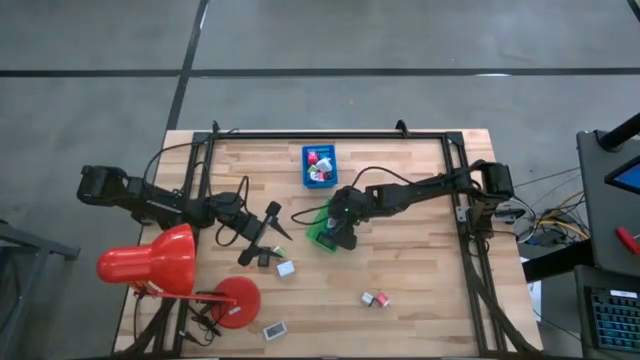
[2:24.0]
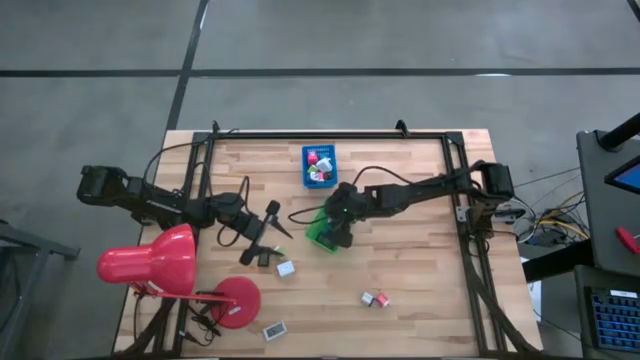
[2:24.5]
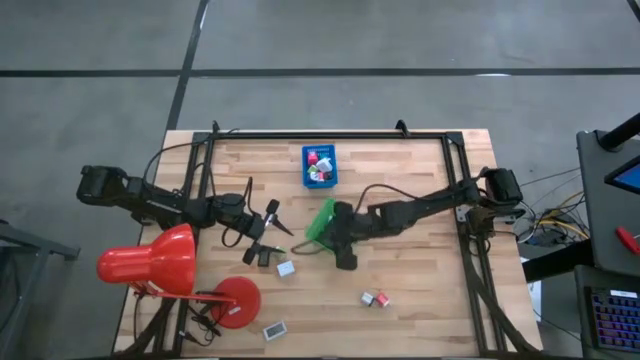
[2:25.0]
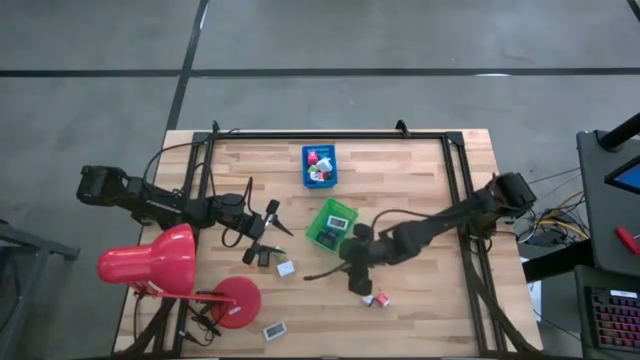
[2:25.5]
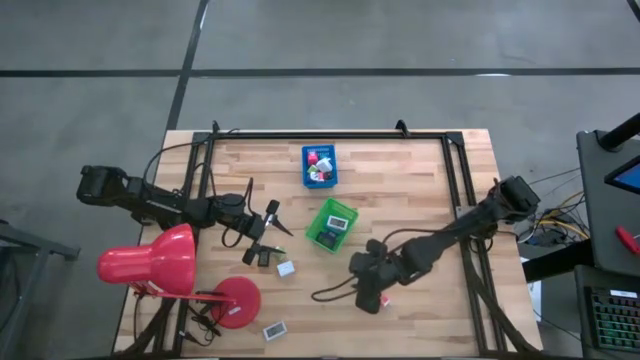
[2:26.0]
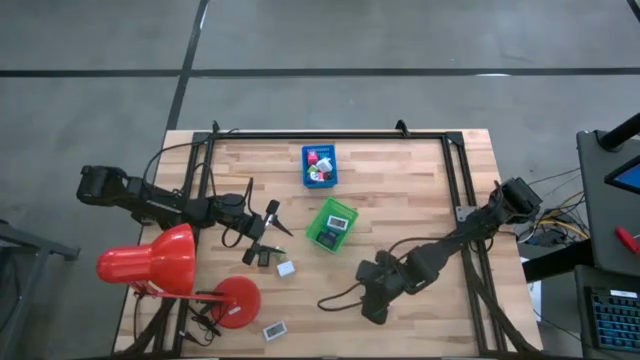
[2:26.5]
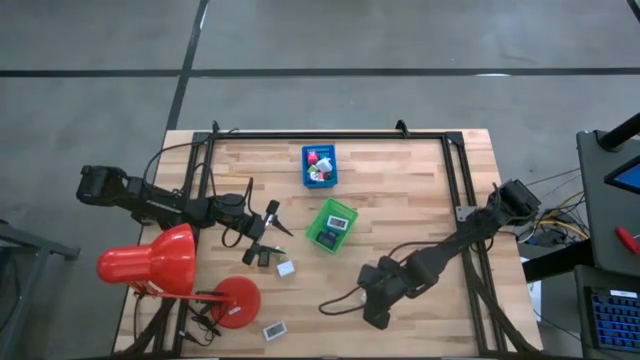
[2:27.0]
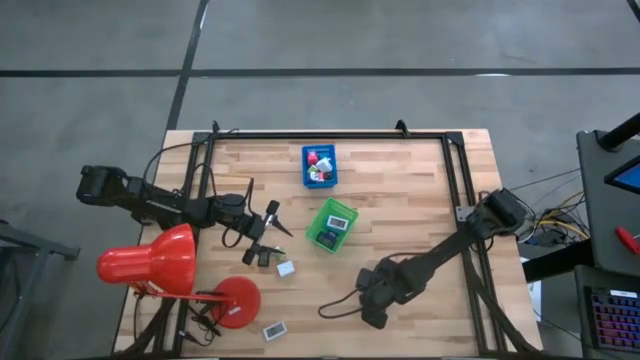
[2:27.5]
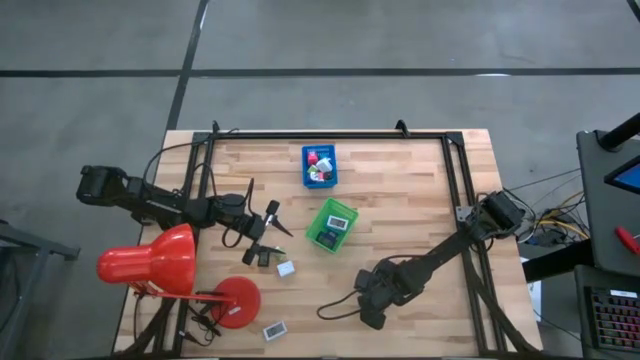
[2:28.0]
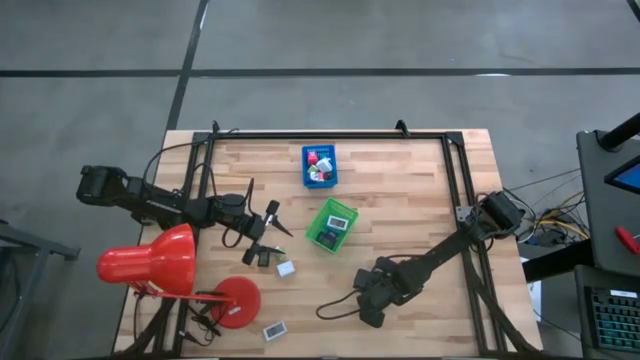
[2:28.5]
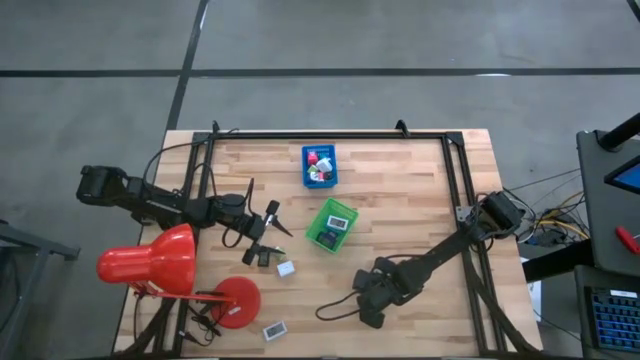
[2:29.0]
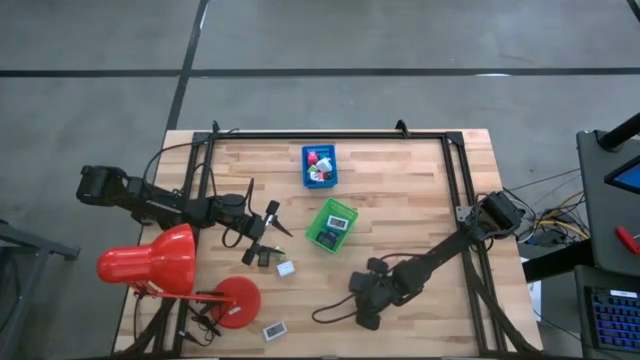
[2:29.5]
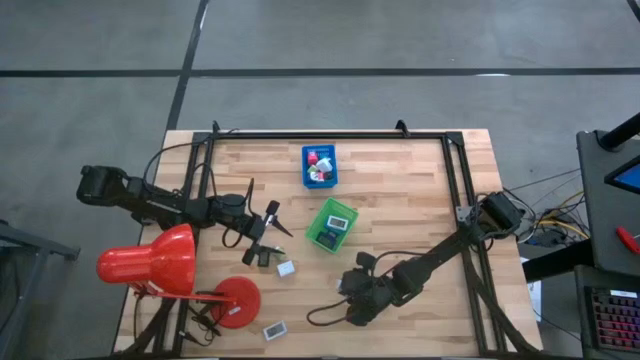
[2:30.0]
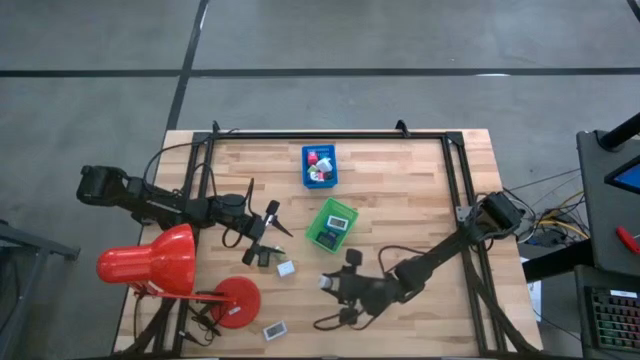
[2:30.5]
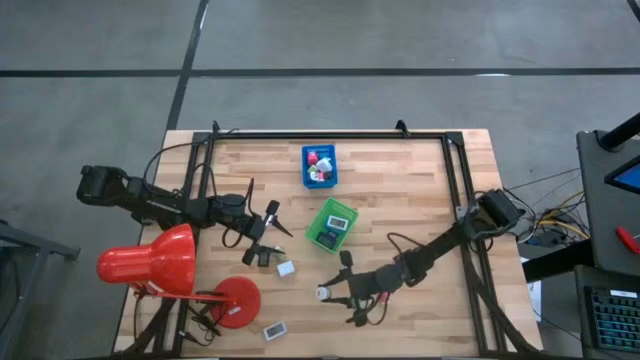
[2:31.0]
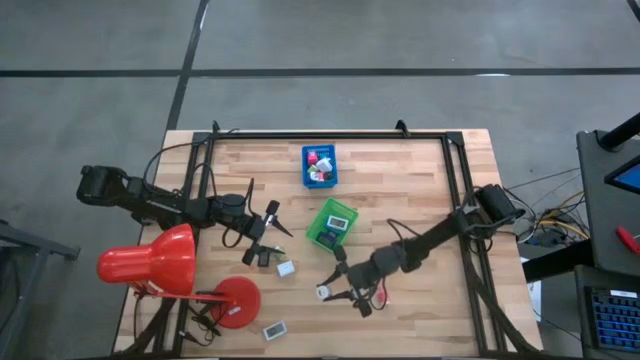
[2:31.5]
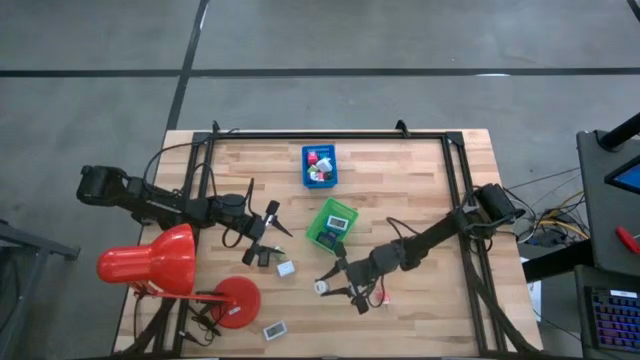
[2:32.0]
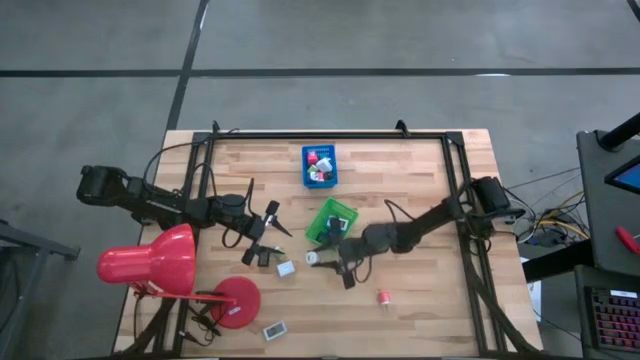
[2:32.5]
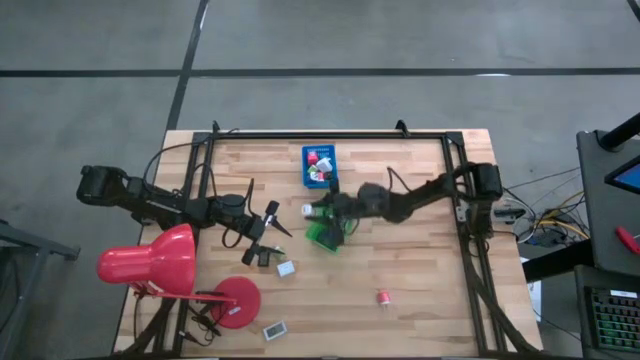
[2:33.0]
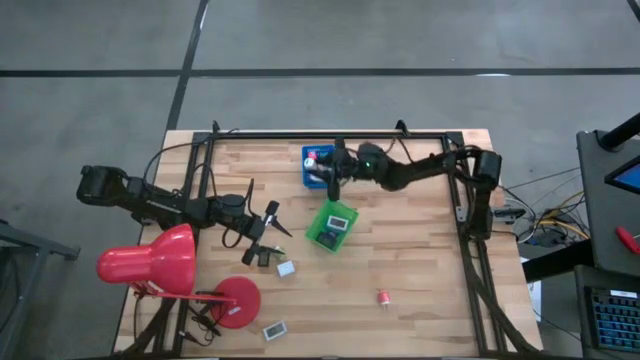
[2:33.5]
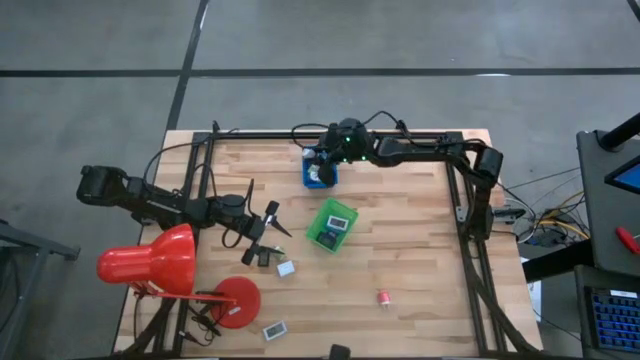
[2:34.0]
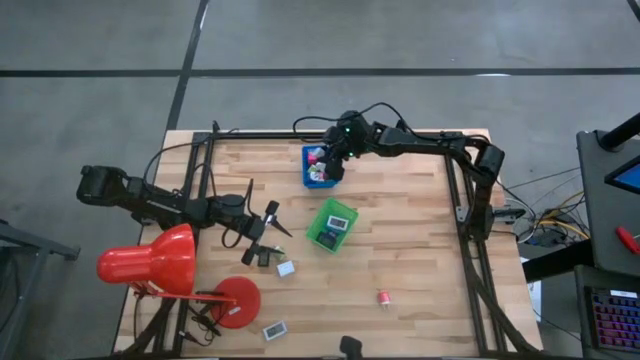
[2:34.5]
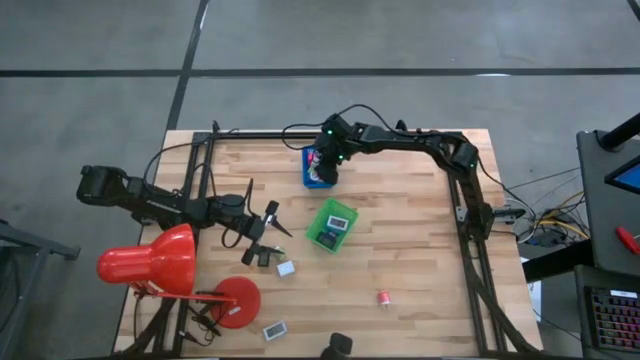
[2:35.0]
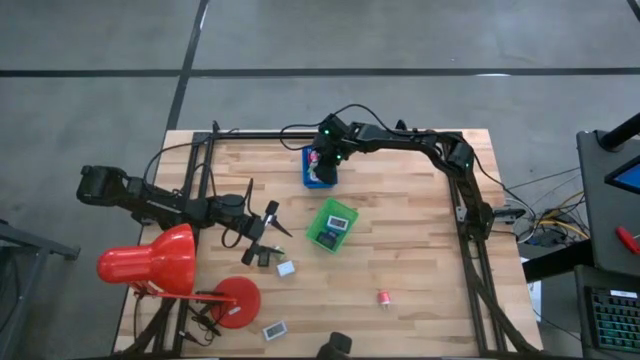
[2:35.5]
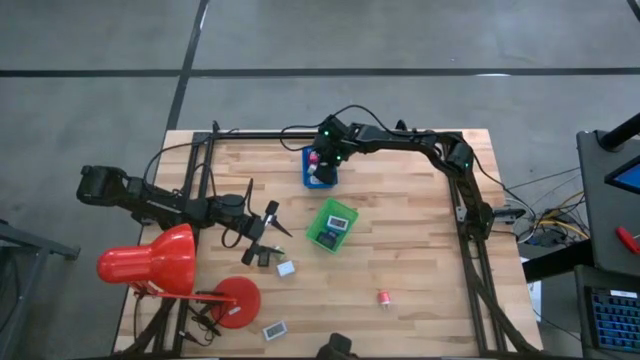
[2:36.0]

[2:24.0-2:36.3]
Task: Pick & Place Office items
Put the small white charger adapter into the blue bin

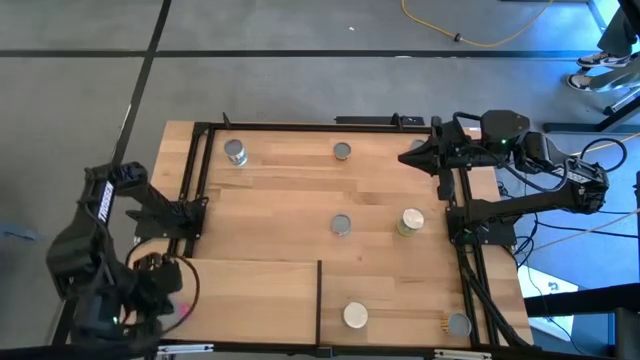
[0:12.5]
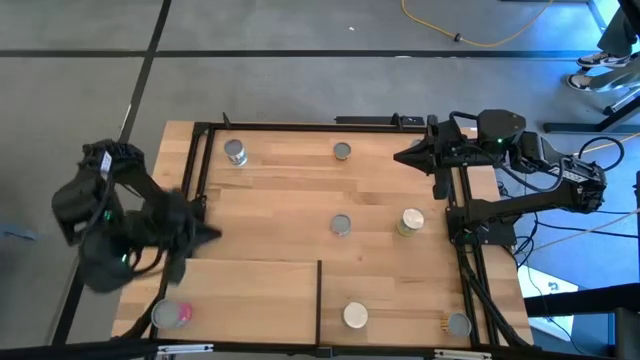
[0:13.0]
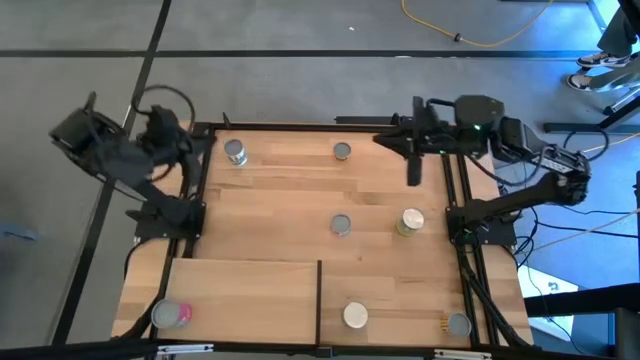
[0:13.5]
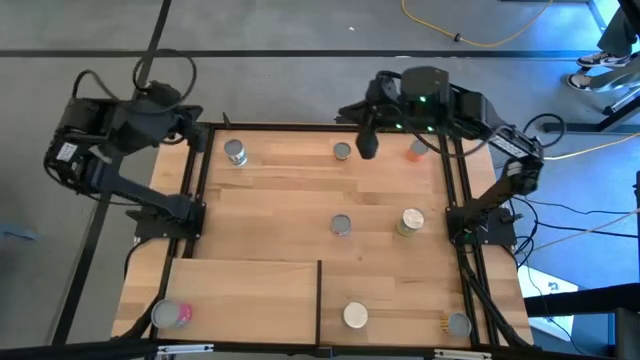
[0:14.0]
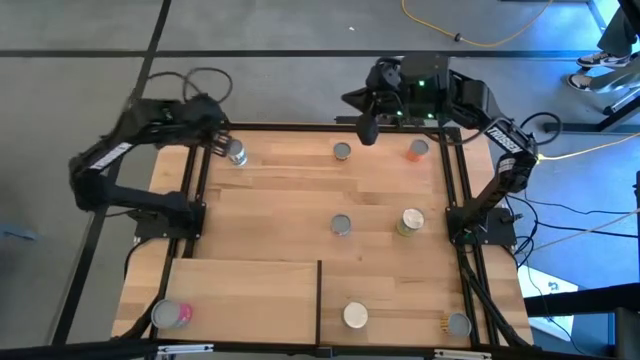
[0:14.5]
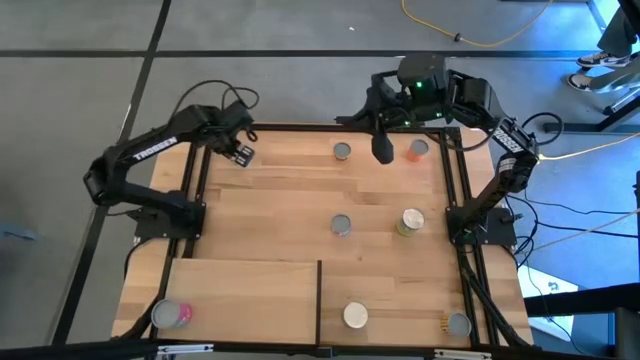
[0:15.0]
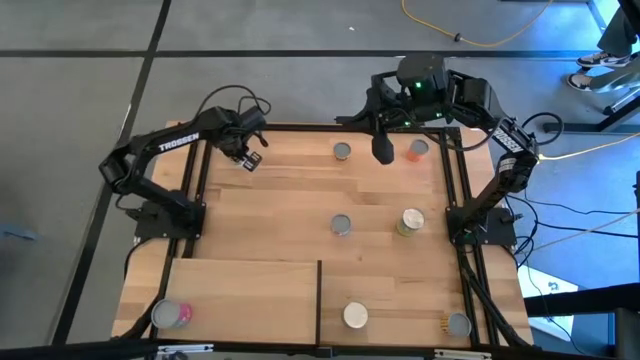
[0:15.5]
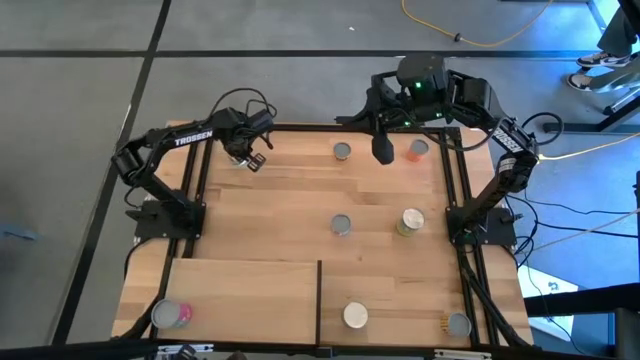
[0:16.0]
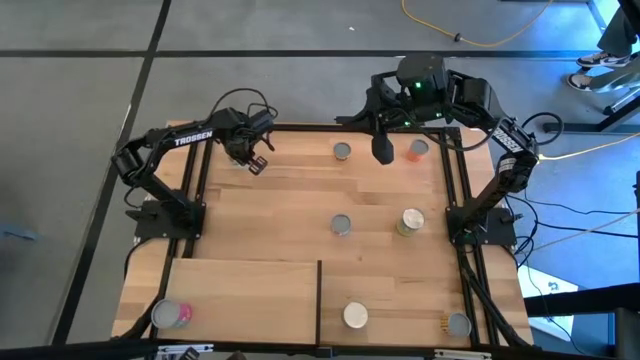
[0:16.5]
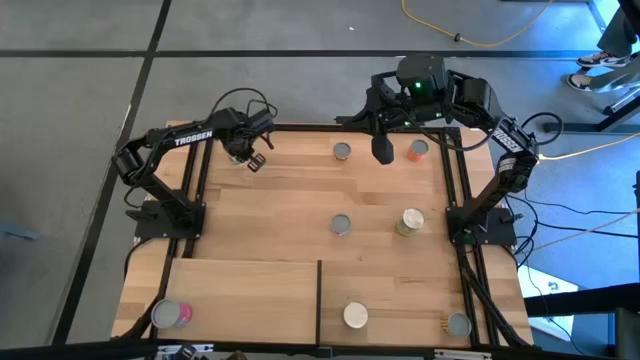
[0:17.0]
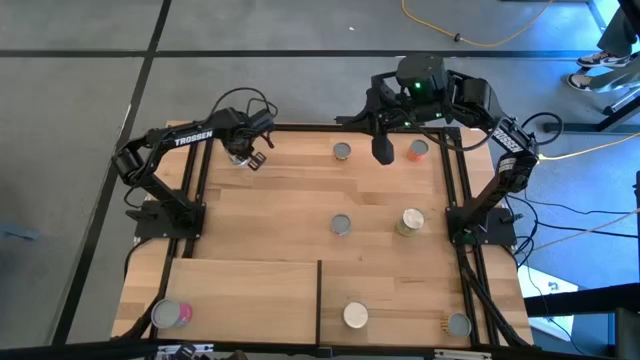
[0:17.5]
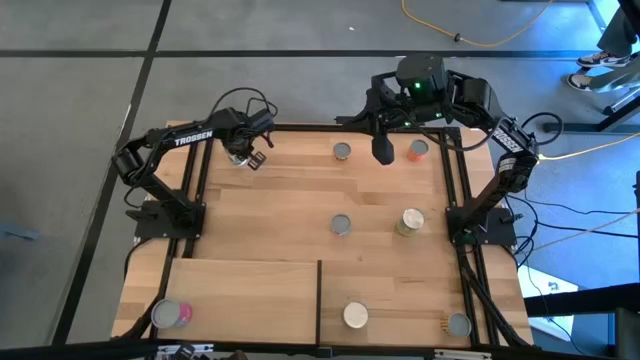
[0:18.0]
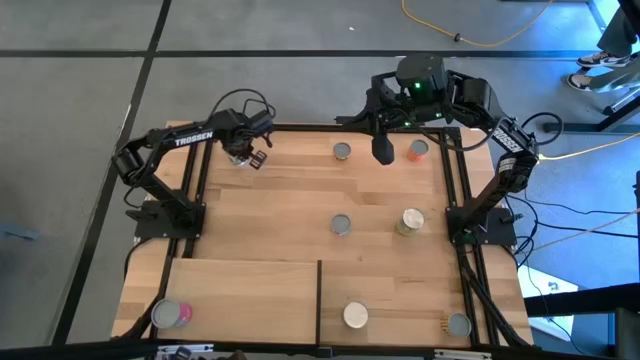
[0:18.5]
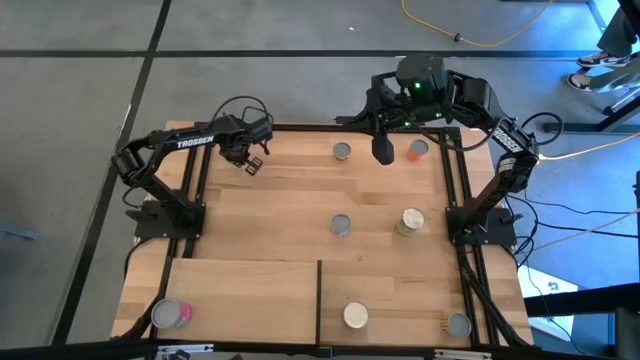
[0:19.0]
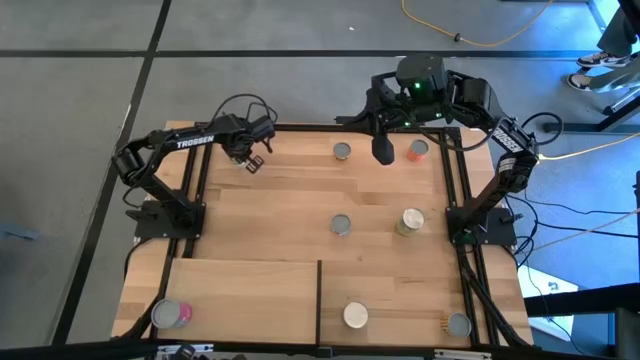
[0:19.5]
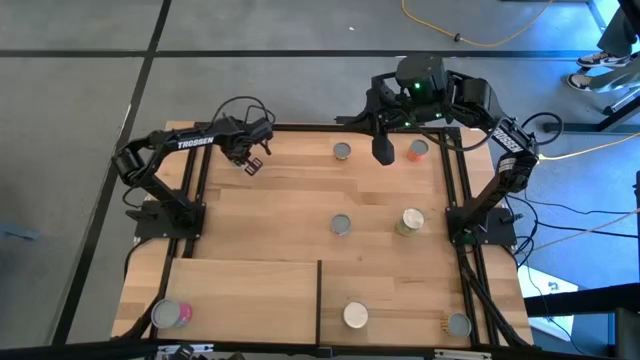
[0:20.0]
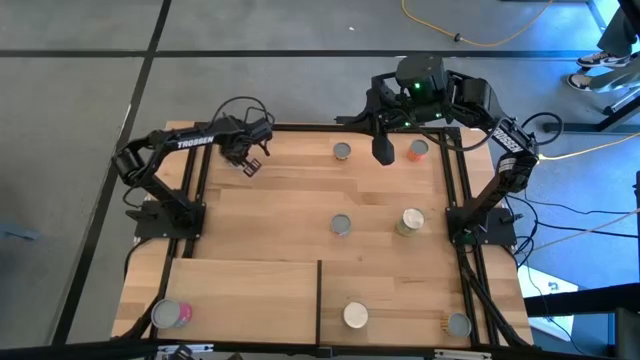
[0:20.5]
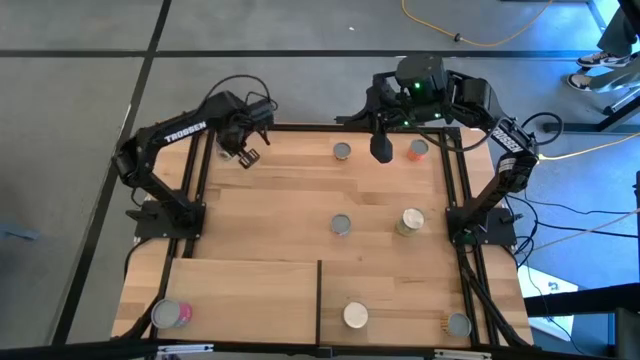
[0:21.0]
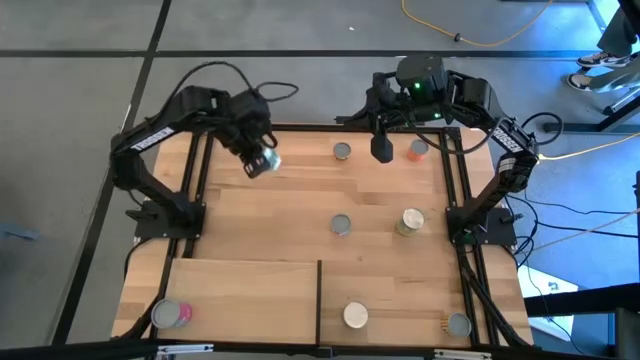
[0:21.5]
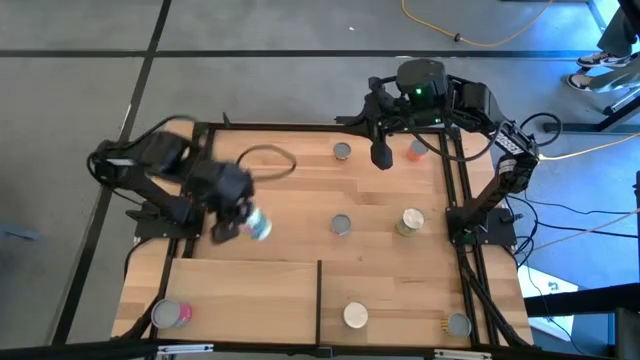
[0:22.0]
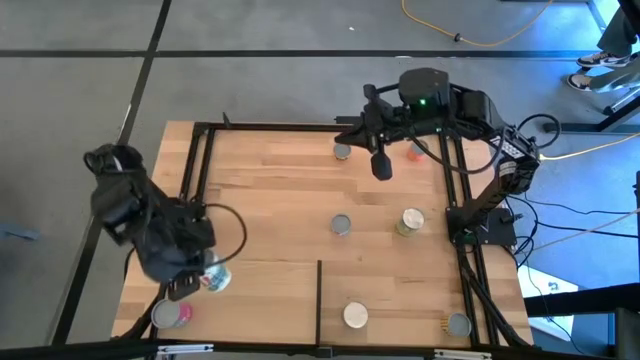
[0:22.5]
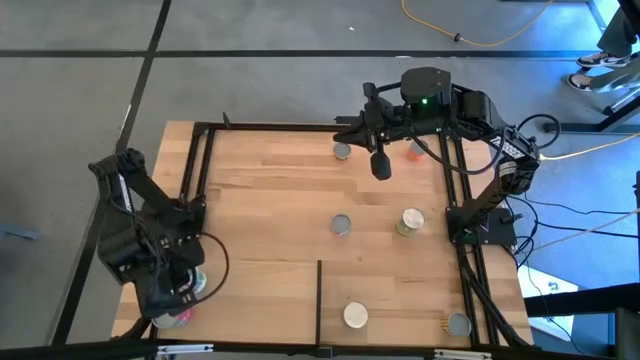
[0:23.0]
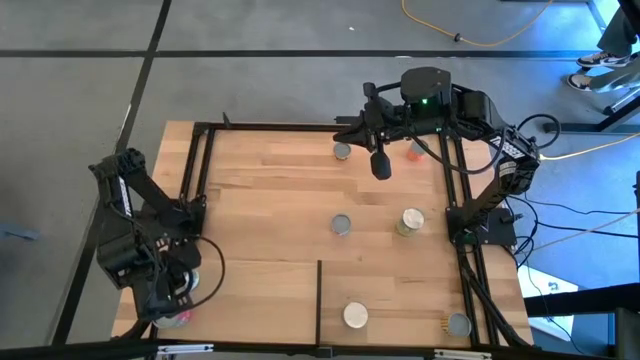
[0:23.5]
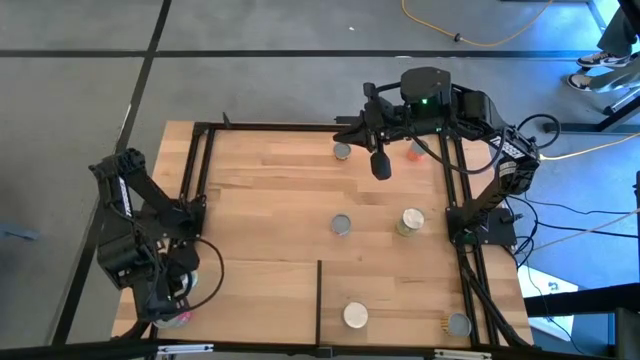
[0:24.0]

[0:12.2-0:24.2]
Task: Pick and place cans onto a shelf
Put the canned mixed fruits on the shelf
